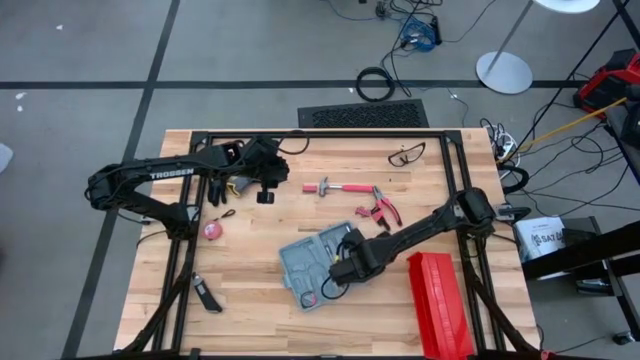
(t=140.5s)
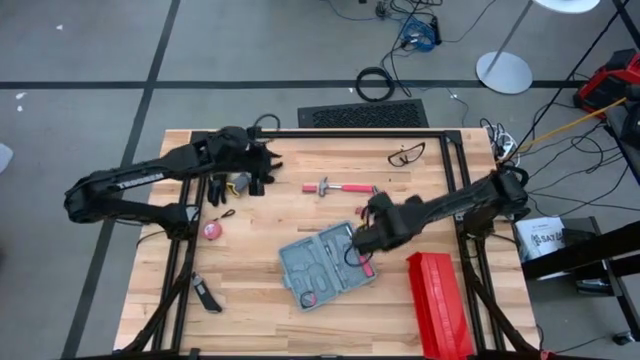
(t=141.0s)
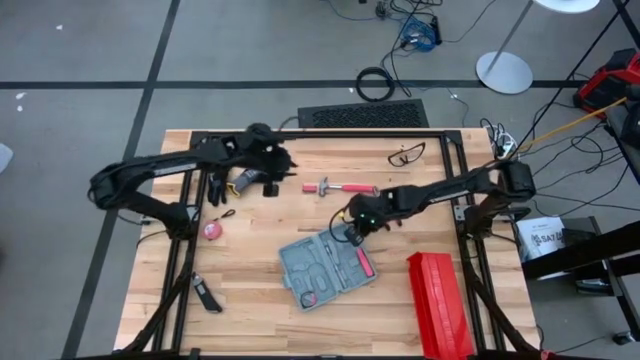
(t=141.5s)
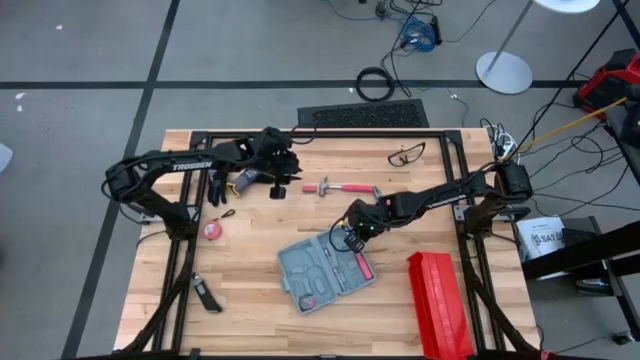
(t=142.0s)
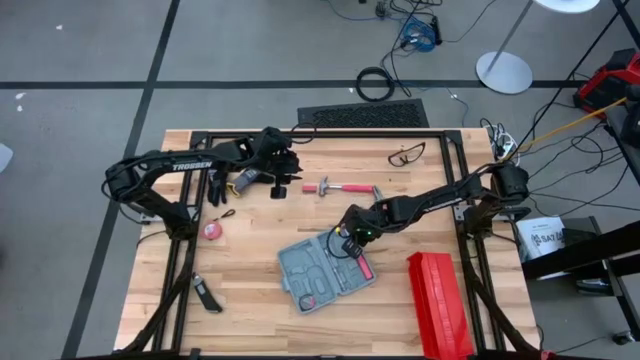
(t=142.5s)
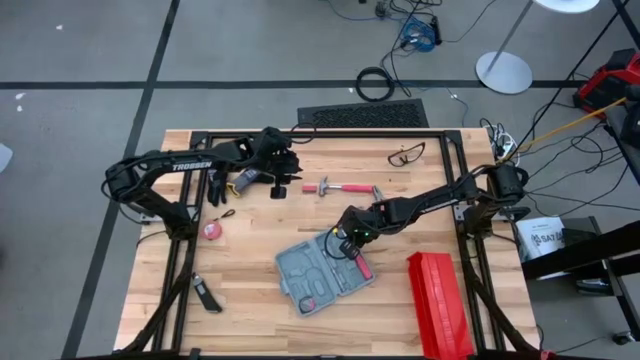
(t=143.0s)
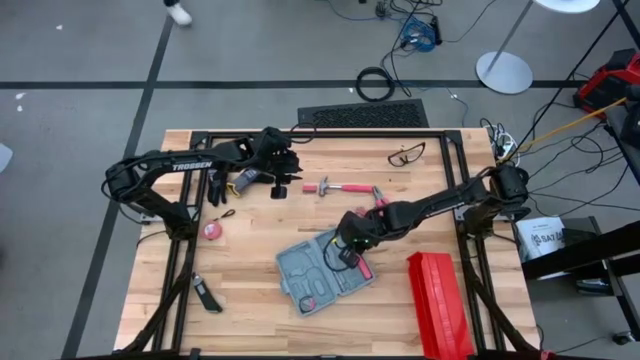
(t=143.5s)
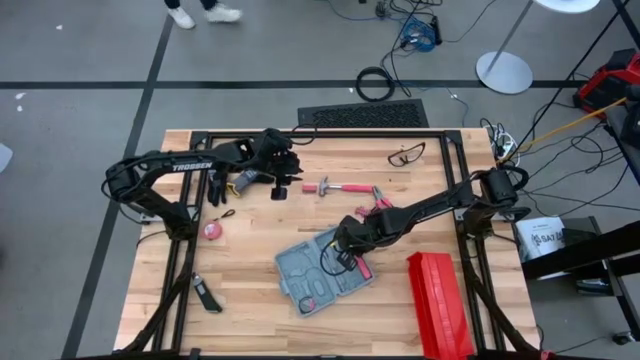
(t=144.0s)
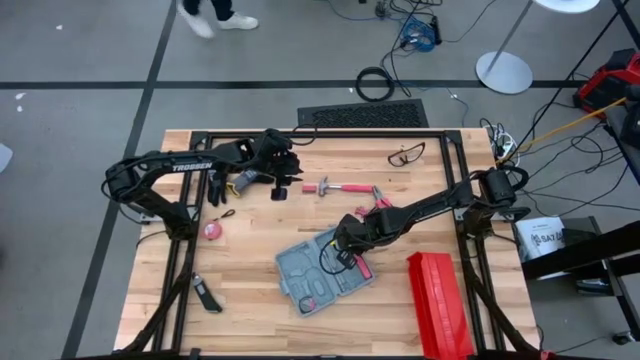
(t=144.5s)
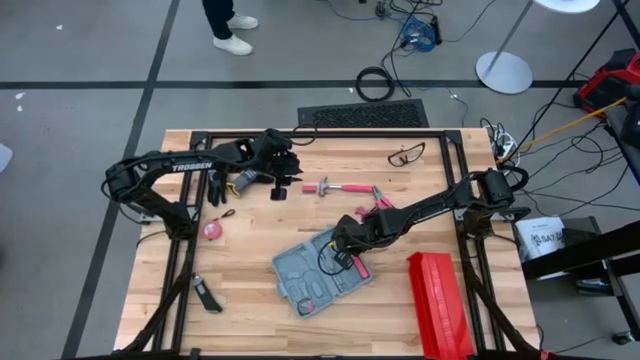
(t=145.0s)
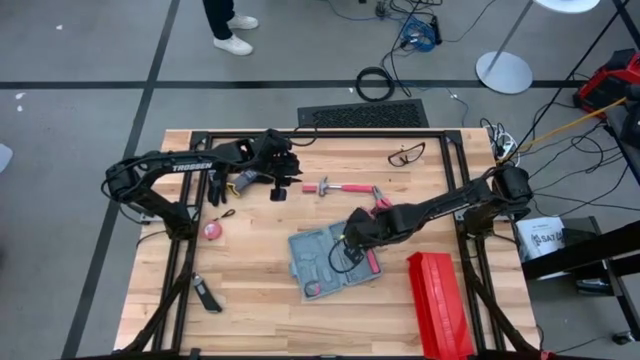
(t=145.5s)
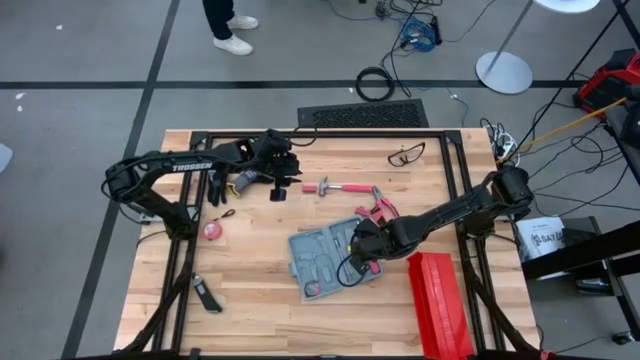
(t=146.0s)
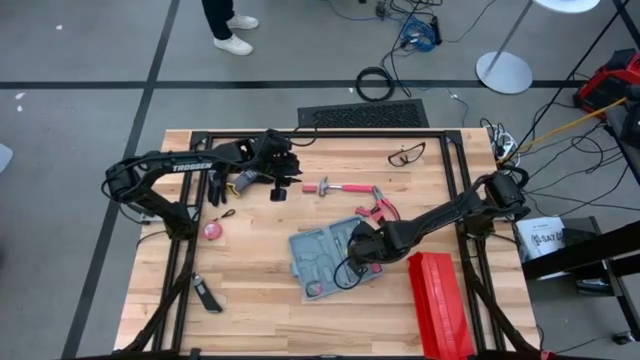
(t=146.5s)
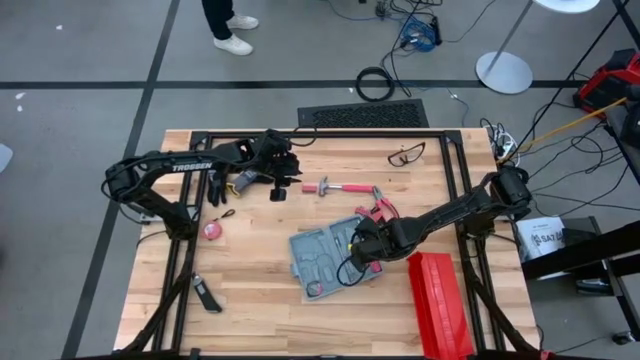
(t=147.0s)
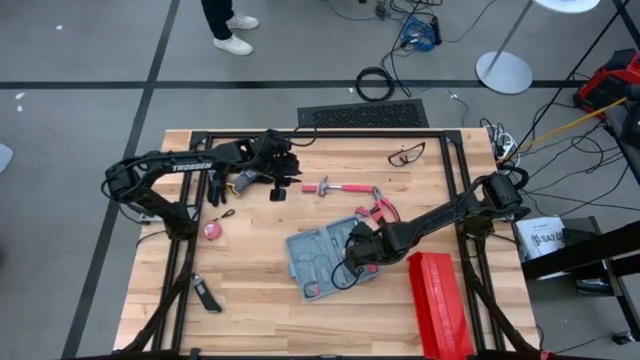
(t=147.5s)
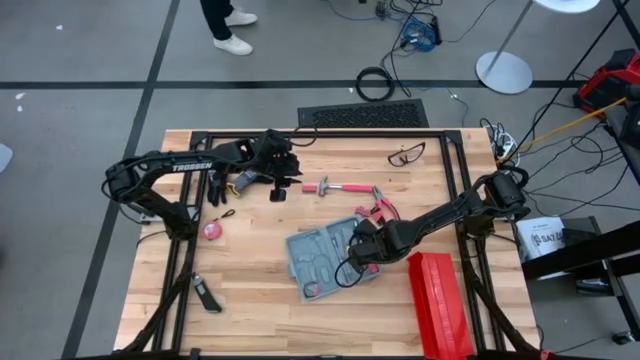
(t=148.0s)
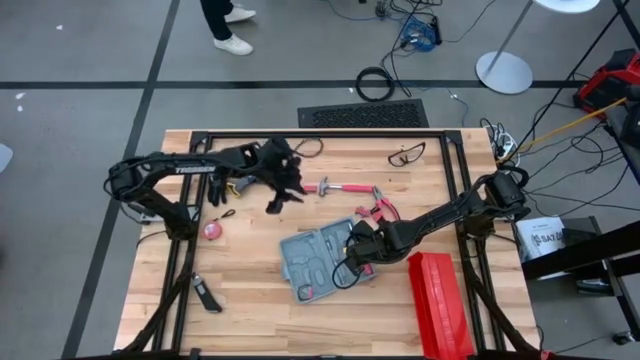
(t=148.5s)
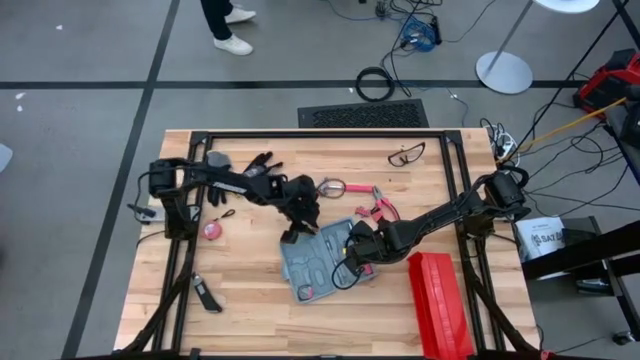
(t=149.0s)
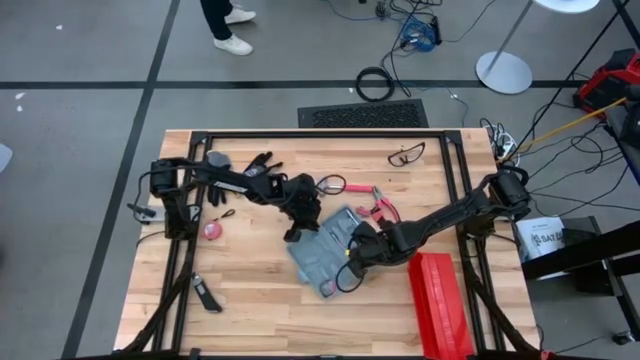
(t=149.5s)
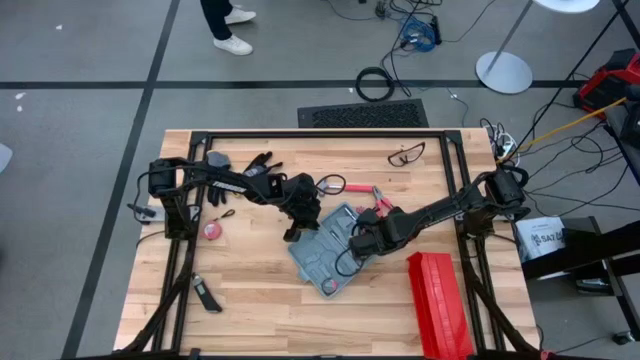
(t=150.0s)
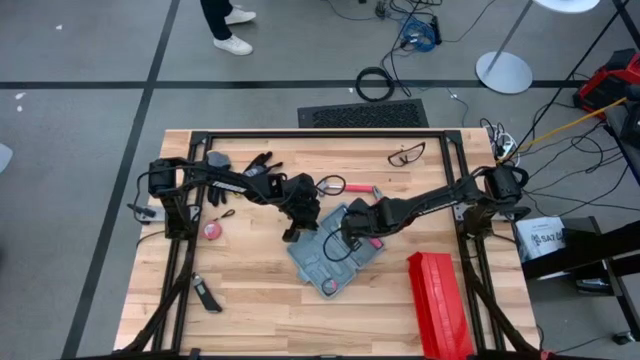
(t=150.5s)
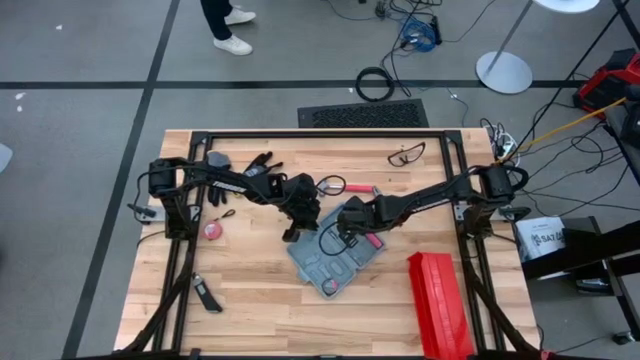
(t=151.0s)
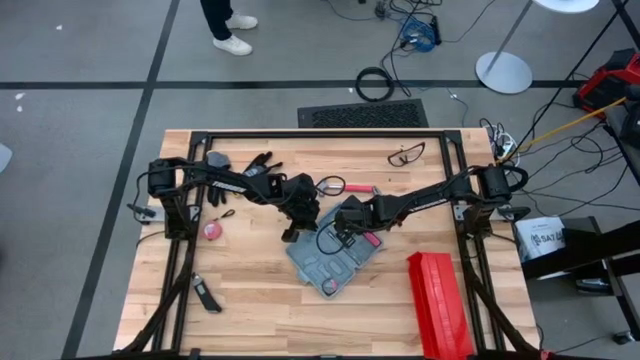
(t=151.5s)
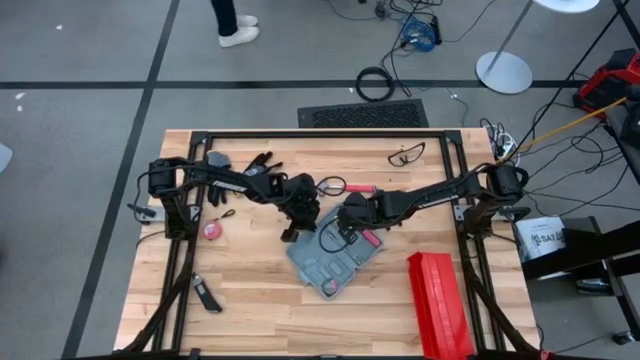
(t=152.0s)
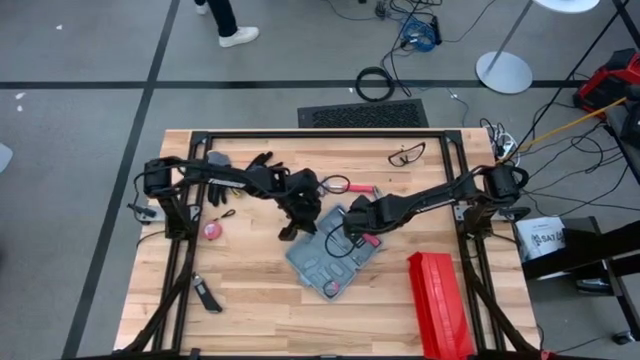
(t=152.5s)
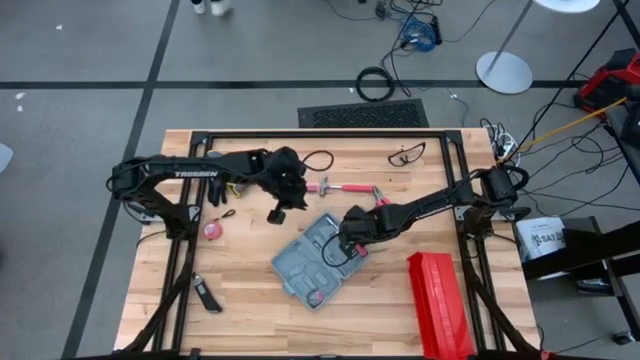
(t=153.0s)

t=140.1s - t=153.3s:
Task: prefit tool cases
Put the red screwdriver into the gray prefit tools case

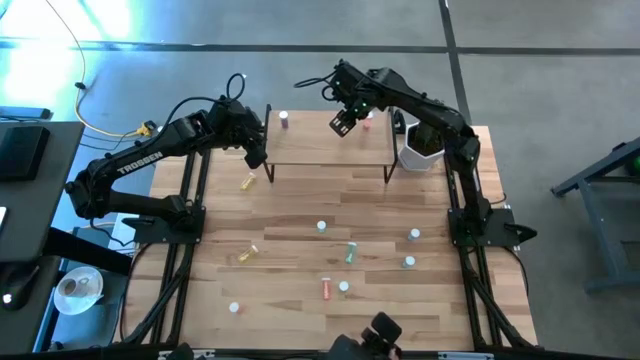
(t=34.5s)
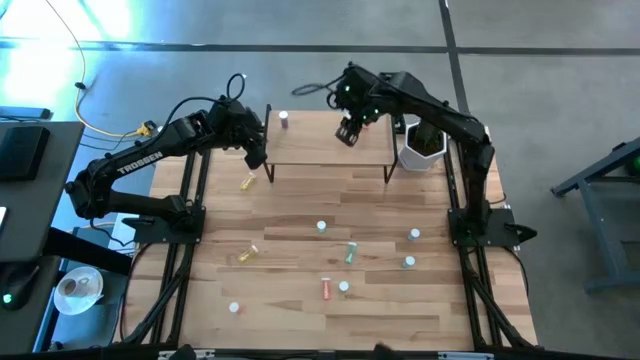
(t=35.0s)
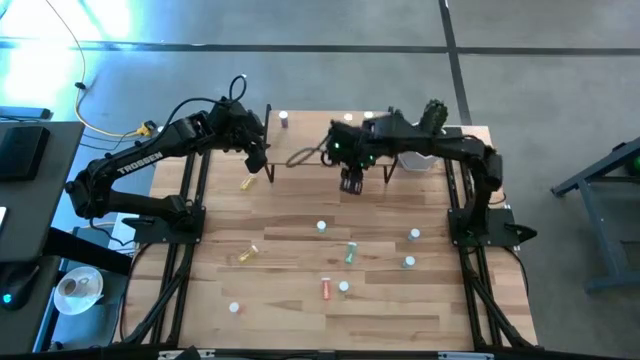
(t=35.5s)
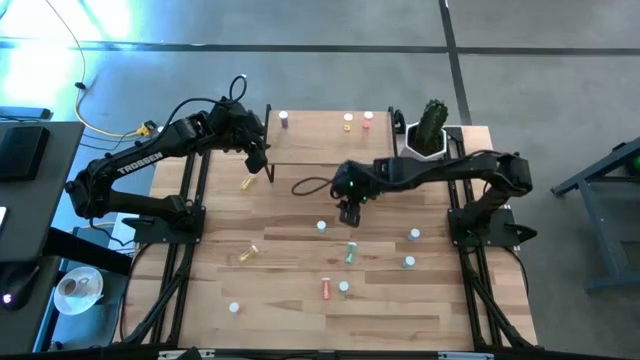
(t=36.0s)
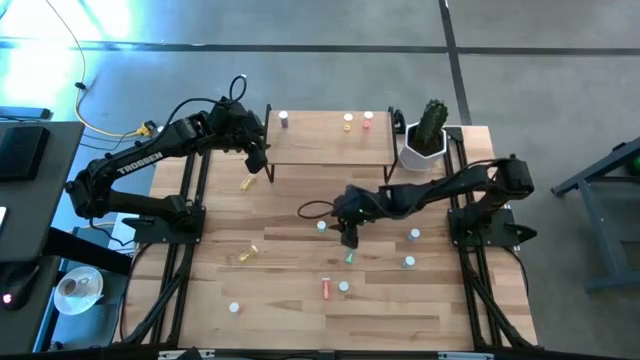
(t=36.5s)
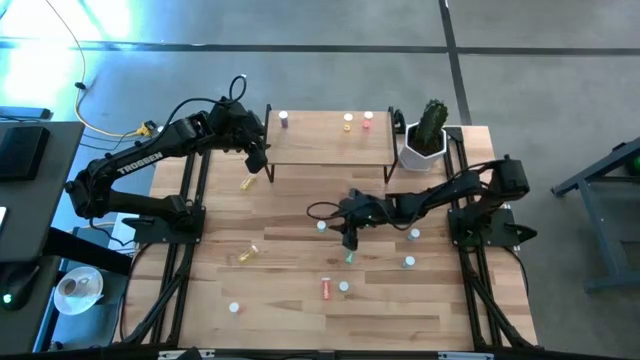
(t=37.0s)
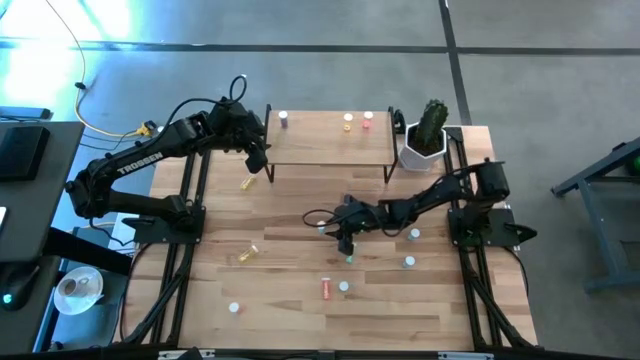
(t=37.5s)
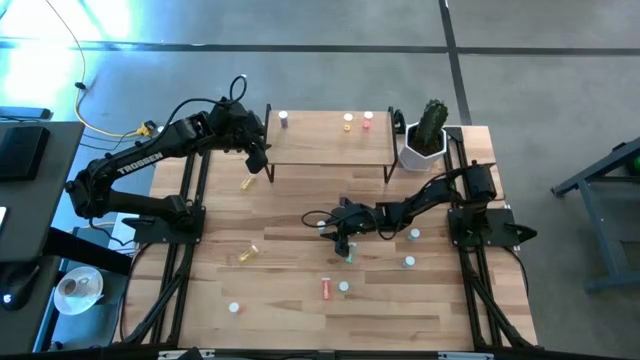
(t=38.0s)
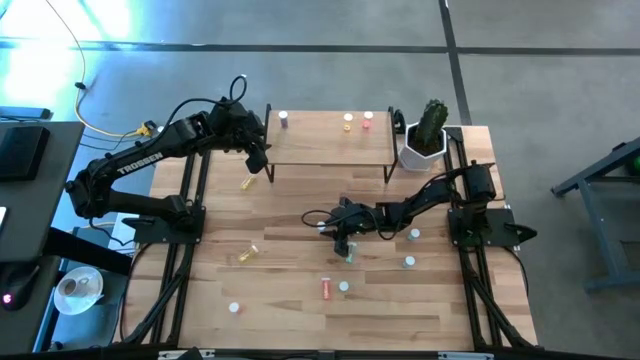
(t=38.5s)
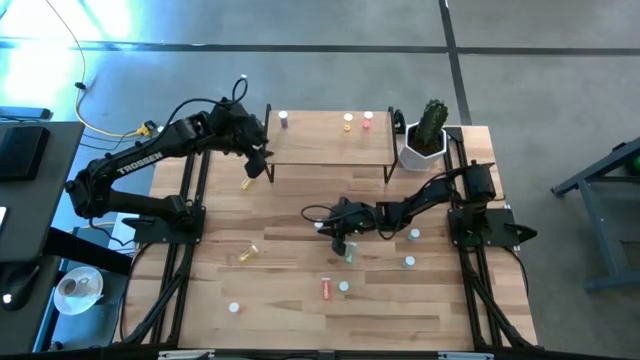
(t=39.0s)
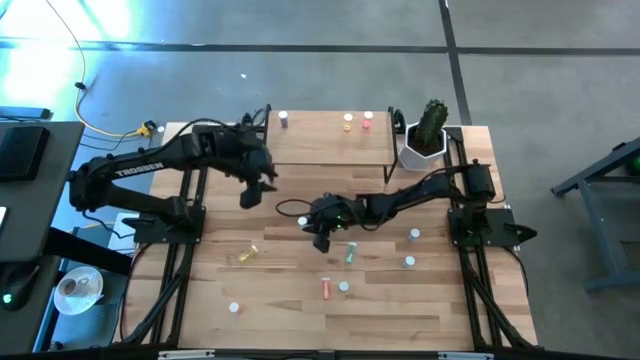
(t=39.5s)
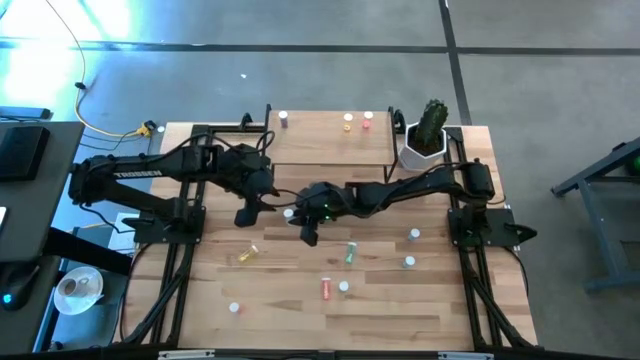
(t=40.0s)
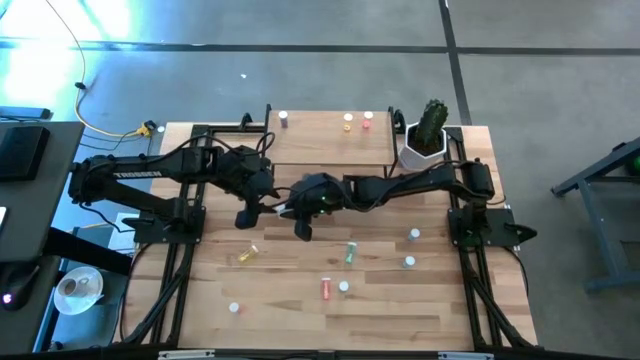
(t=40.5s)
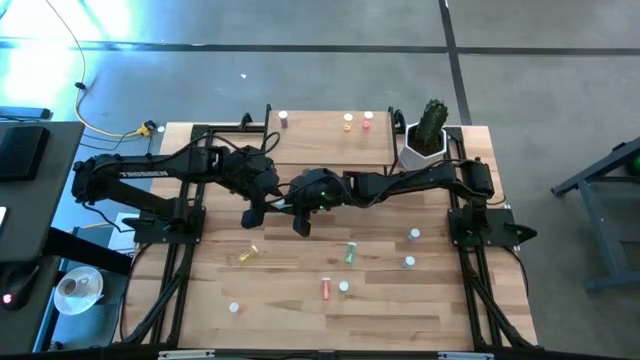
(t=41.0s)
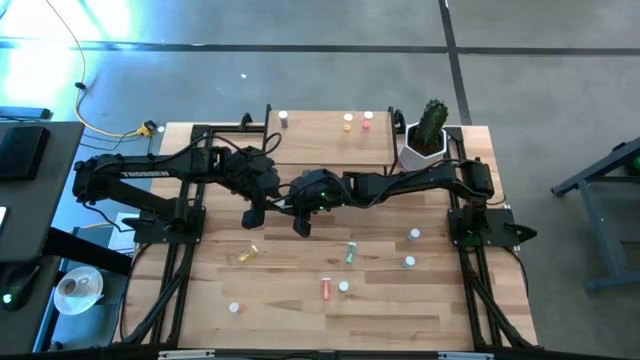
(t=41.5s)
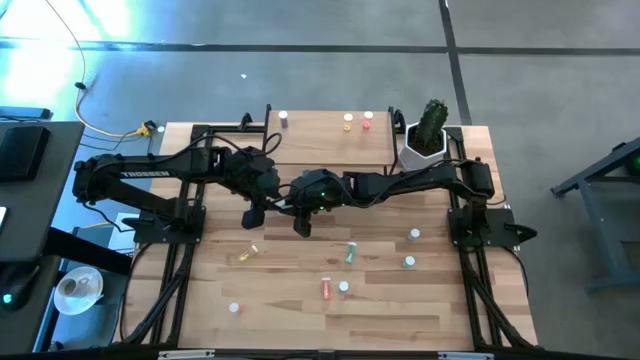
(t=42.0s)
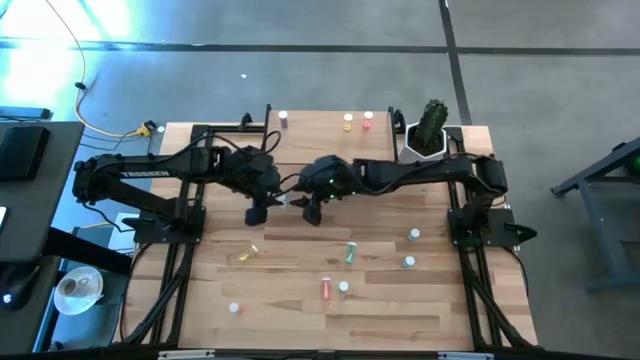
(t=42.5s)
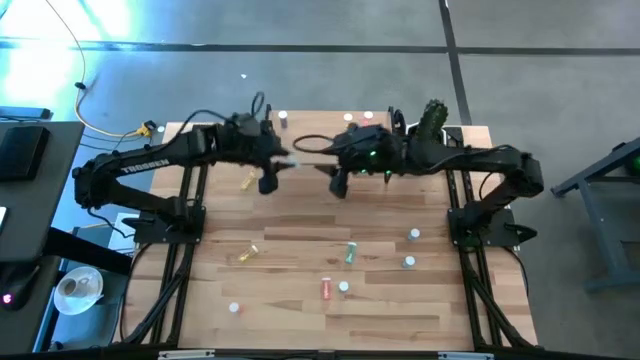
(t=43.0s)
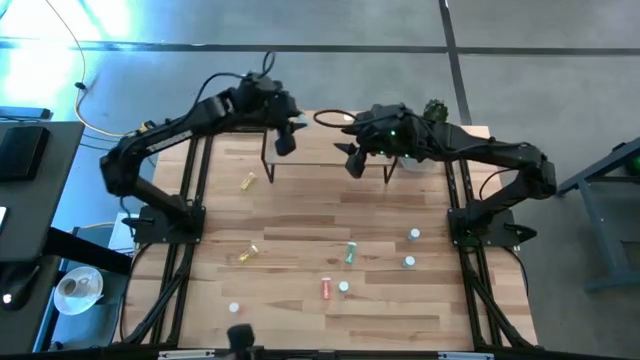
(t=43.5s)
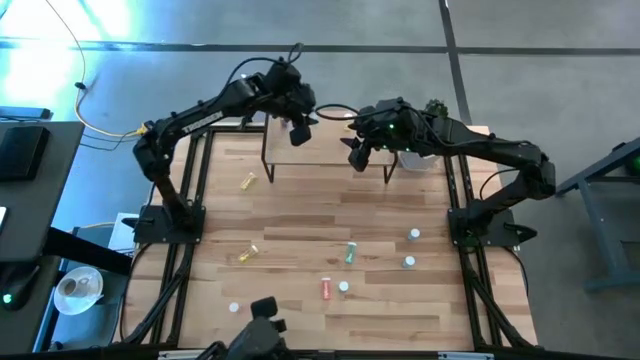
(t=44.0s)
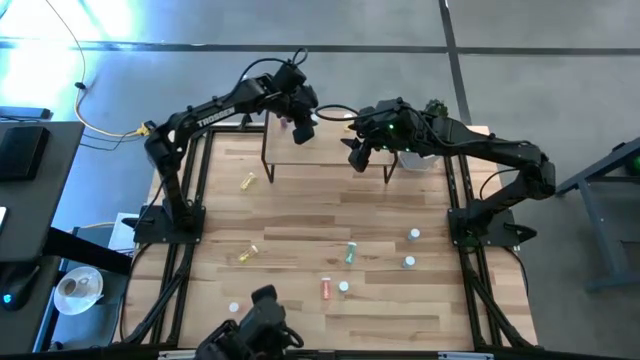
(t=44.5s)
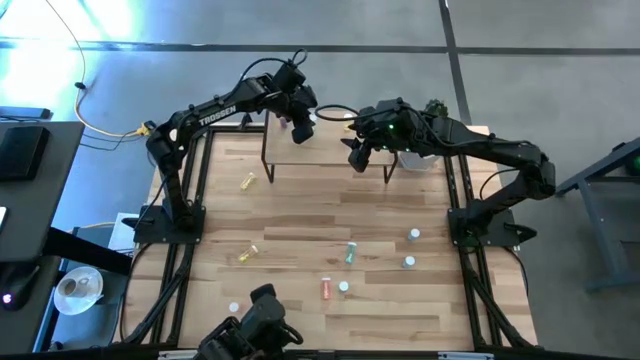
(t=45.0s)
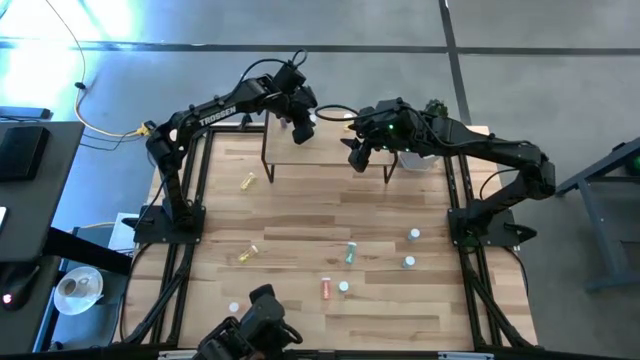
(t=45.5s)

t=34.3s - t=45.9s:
Task: Pick and place medicine bottles onto shelf by color
Put the blue pill bottle on the shelf
